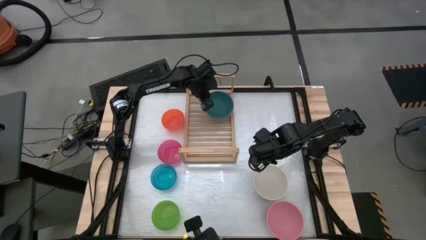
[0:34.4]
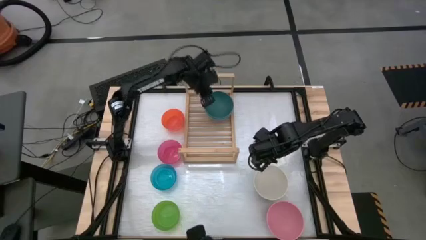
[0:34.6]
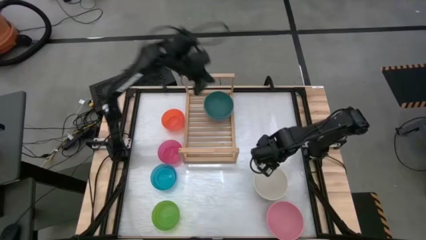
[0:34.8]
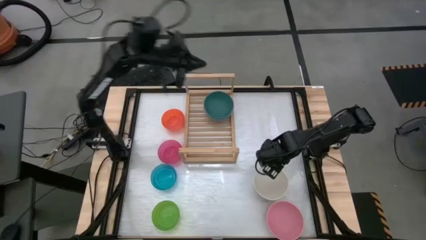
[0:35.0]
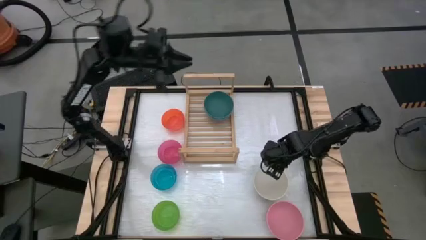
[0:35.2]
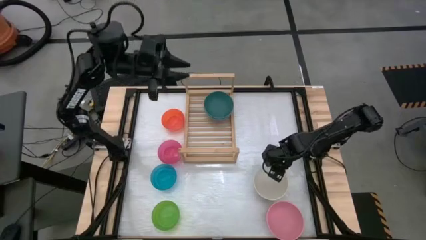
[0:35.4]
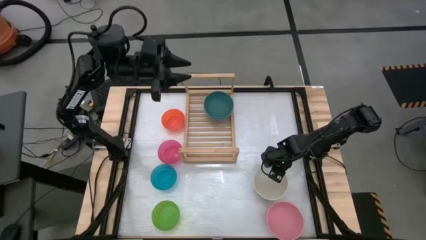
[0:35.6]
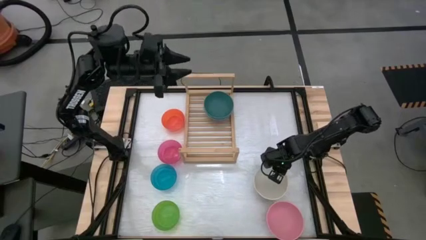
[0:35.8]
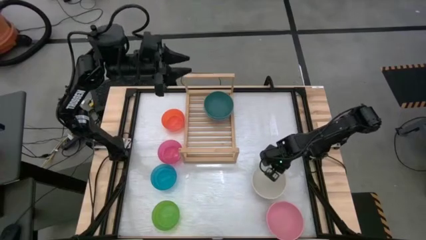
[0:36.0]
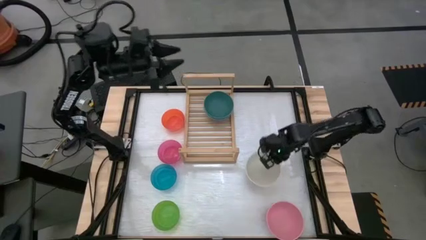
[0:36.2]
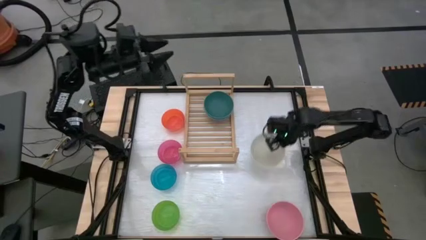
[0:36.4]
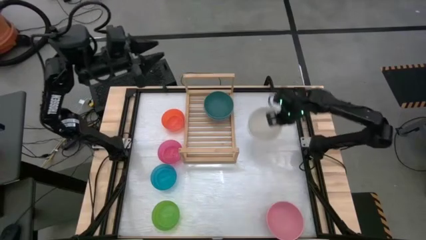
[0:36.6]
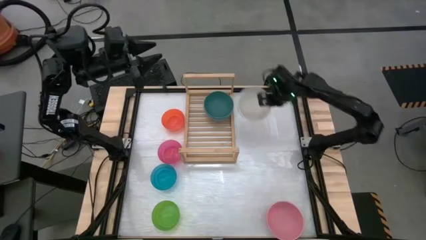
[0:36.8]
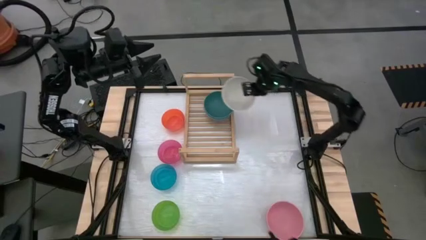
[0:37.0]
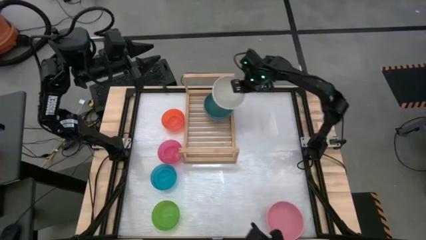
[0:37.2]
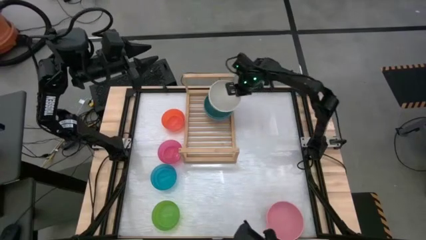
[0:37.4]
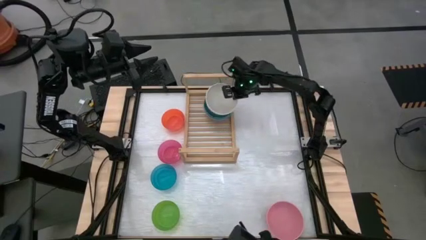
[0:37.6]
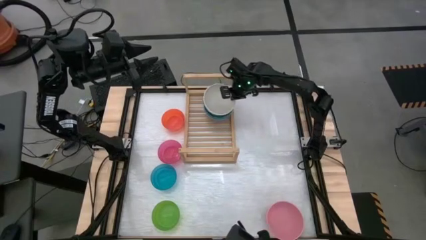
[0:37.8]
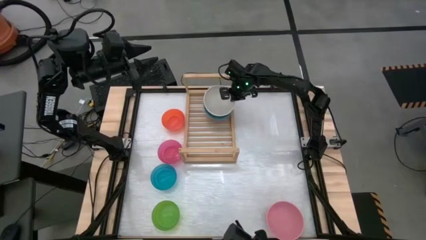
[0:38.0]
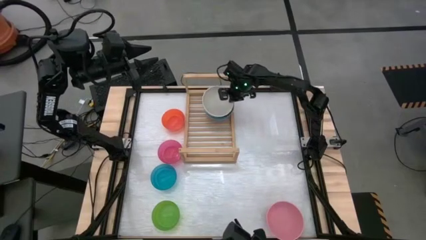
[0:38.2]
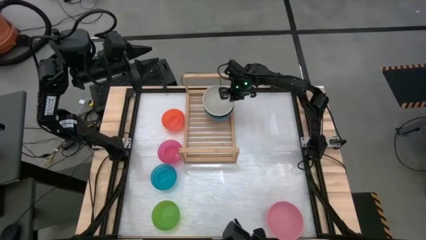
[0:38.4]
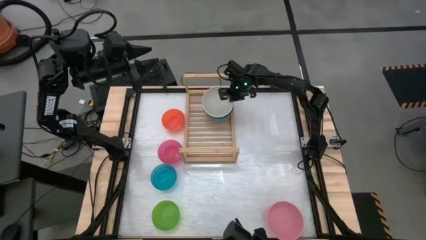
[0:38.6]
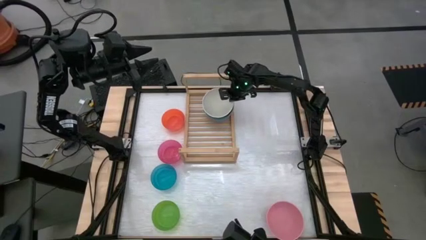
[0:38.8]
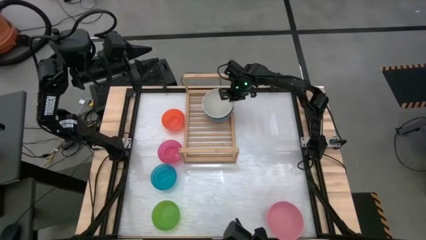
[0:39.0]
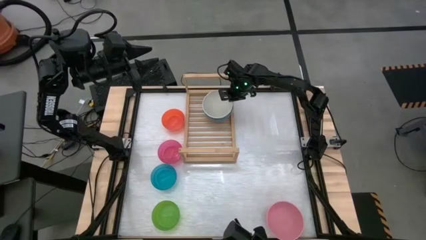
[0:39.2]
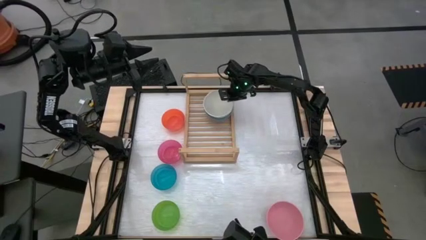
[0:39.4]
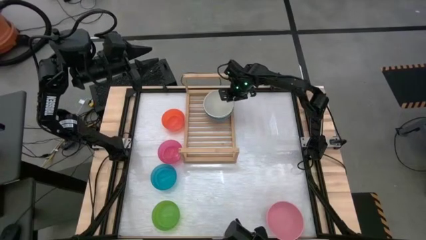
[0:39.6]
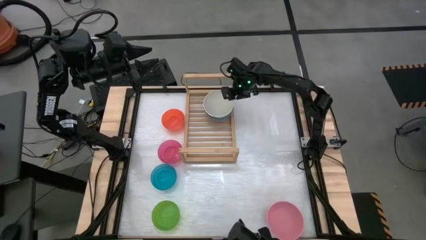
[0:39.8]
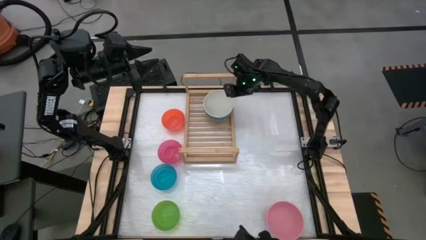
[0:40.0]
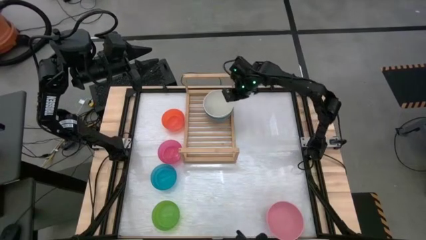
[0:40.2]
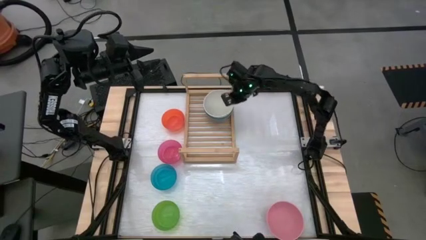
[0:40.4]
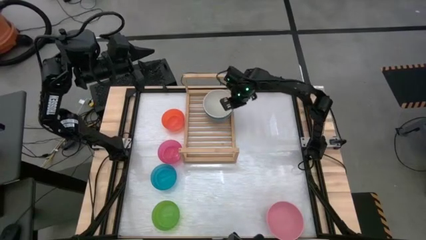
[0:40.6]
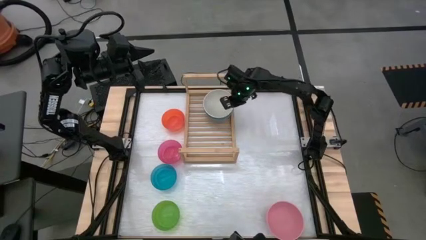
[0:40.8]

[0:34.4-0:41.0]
Task: Place and stack bowls onto a shelf
Stack the white bowl on the green bowl on the shelf

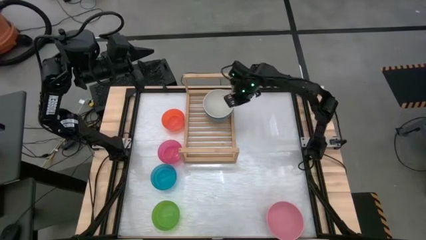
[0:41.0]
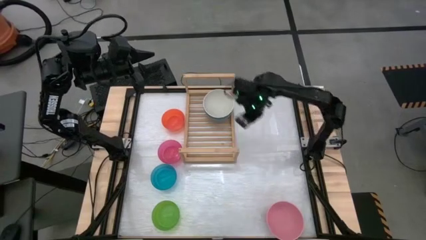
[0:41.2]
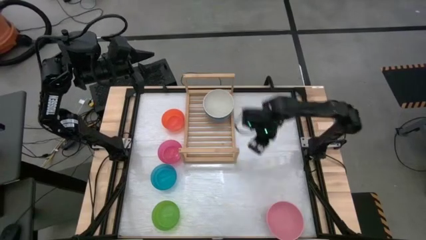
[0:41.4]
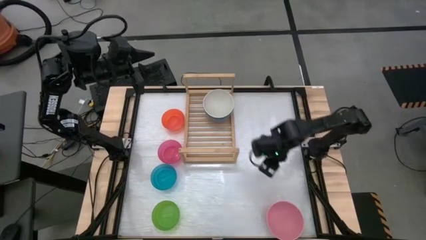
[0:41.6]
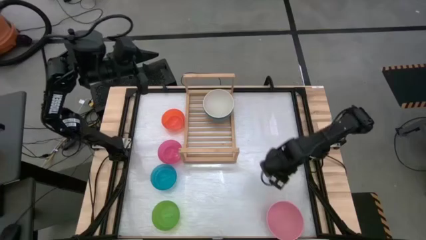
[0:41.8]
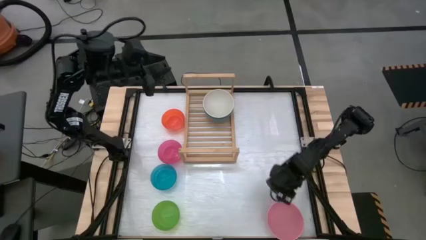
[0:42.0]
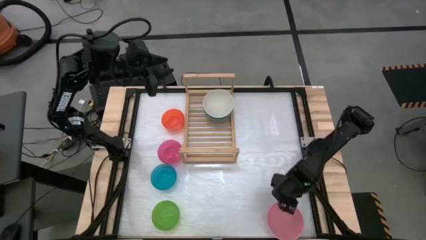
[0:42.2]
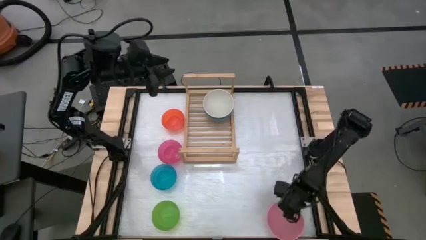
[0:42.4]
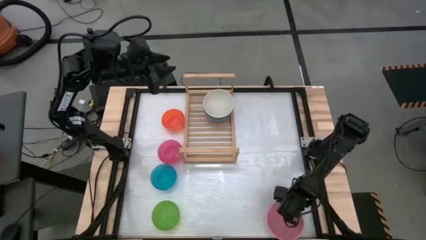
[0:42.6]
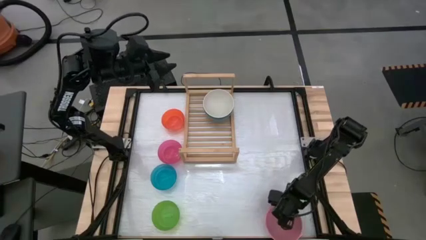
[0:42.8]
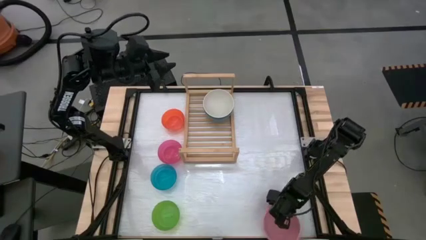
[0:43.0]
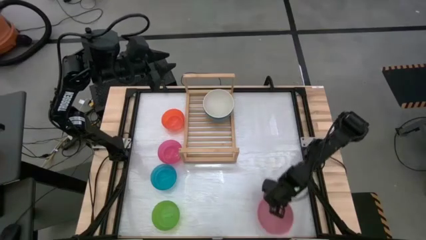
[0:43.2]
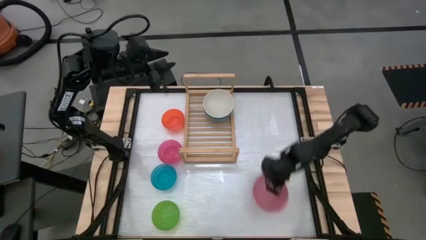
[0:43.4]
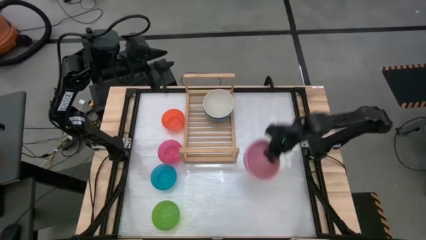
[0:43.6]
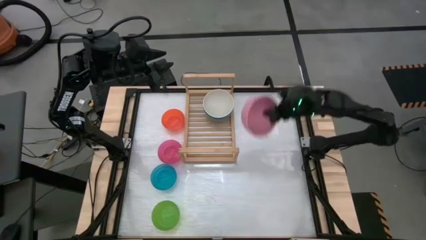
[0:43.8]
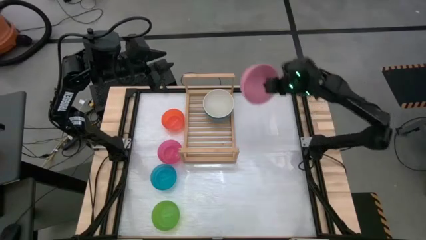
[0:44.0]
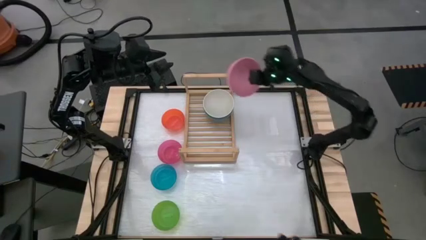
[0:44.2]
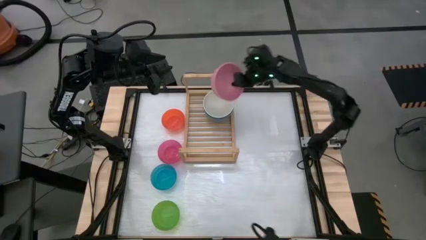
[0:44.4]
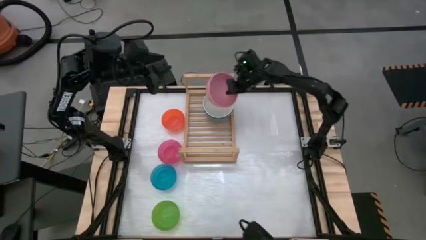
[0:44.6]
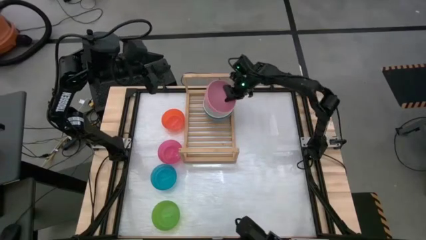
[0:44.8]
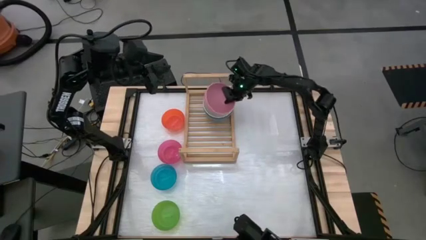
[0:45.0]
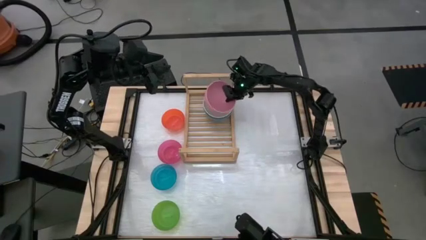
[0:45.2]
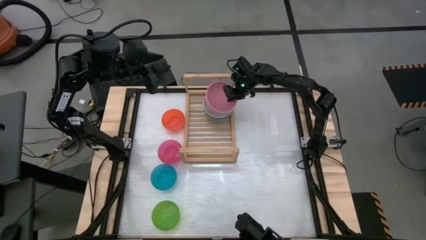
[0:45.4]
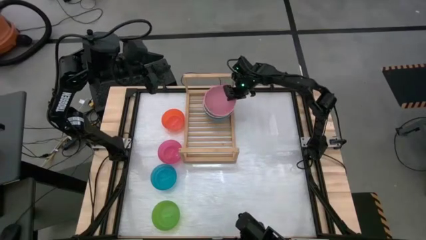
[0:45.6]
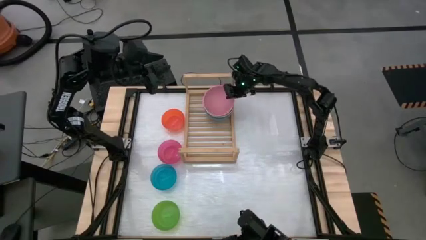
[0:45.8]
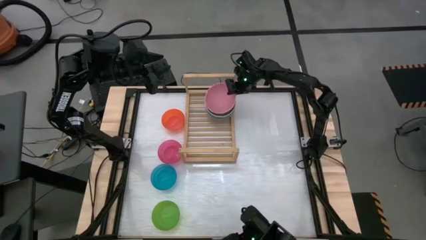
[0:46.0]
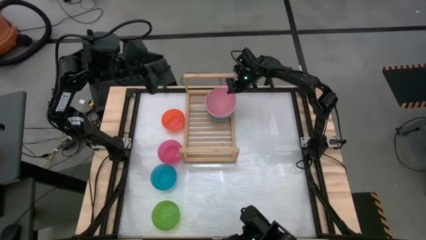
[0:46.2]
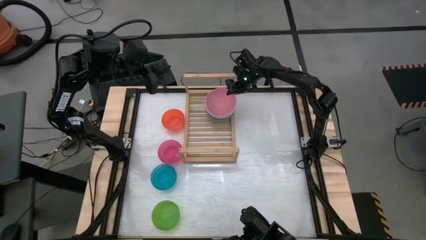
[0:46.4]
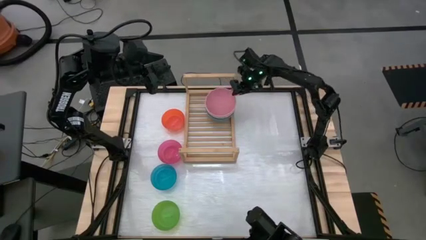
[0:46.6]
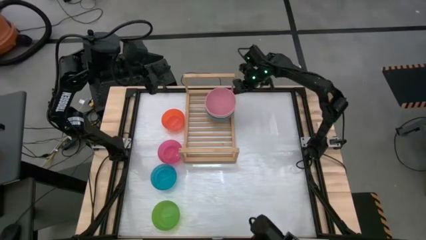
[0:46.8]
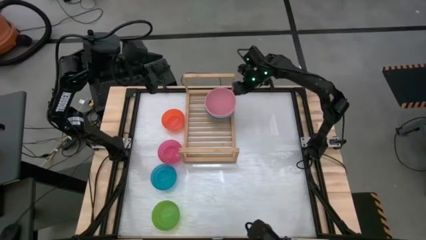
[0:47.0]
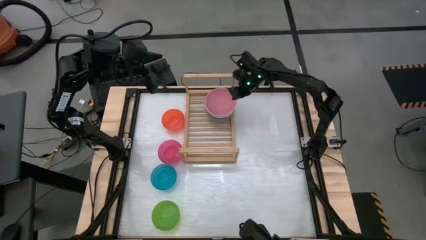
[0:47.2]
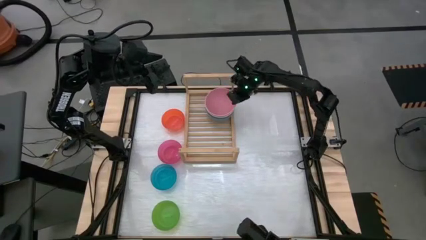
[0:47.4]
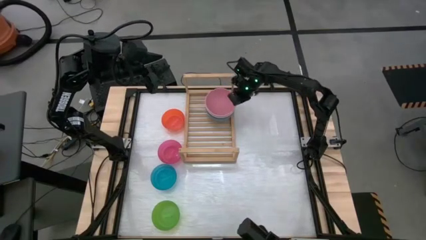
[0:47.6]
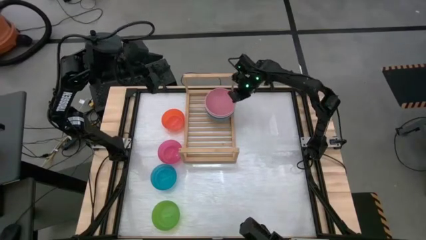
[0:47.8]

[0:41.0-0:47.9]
Stack the right pink bowl on the white bowl on the shelf

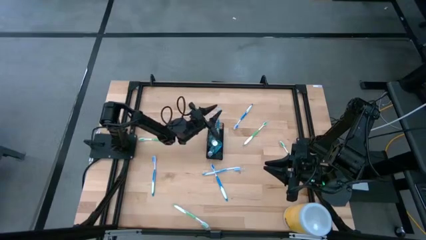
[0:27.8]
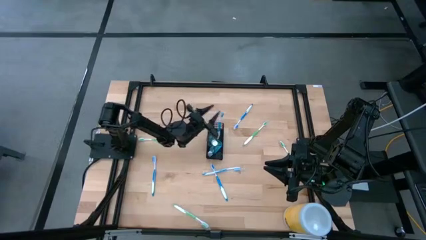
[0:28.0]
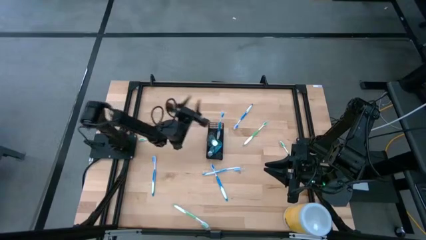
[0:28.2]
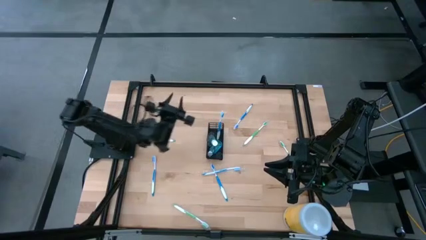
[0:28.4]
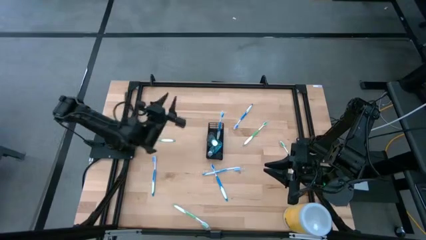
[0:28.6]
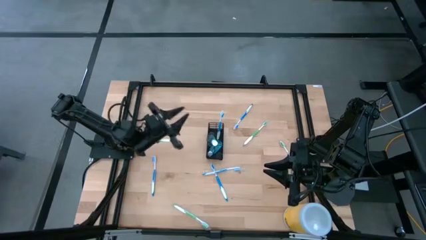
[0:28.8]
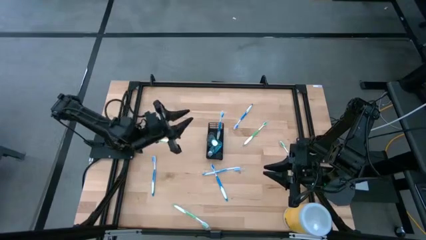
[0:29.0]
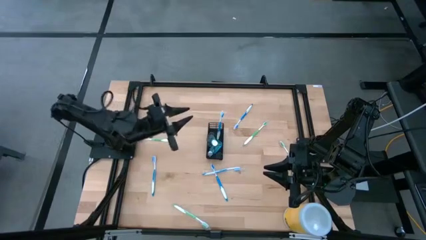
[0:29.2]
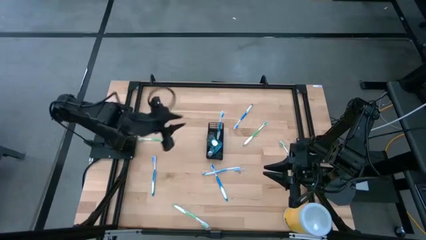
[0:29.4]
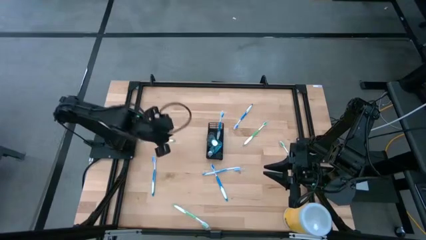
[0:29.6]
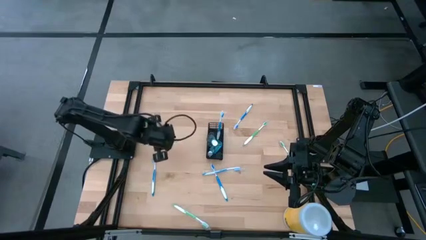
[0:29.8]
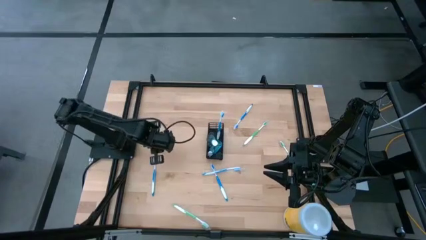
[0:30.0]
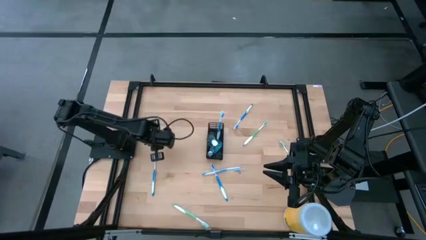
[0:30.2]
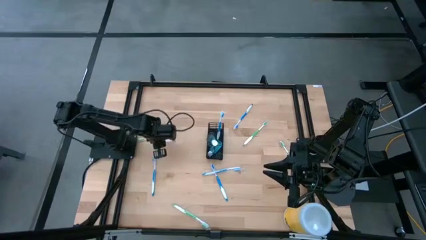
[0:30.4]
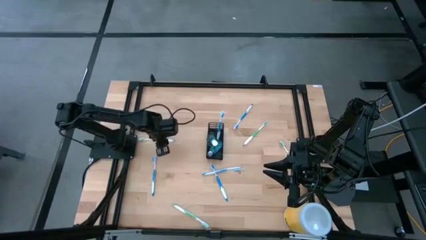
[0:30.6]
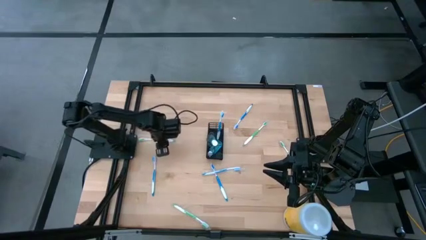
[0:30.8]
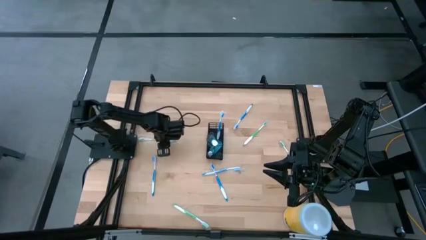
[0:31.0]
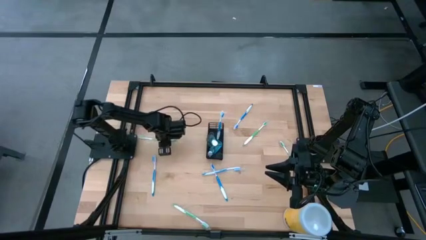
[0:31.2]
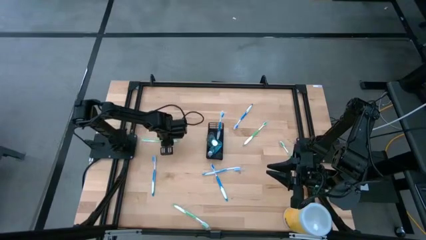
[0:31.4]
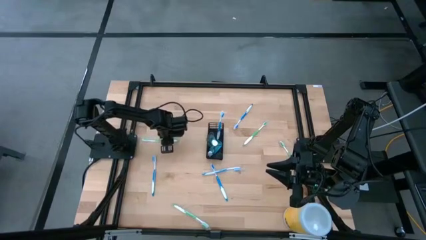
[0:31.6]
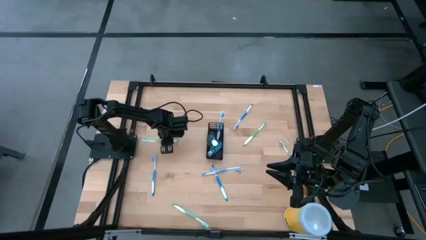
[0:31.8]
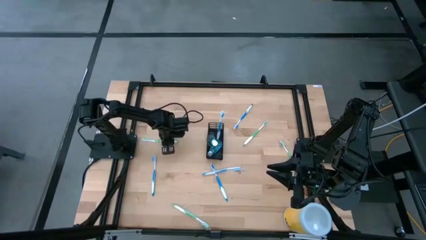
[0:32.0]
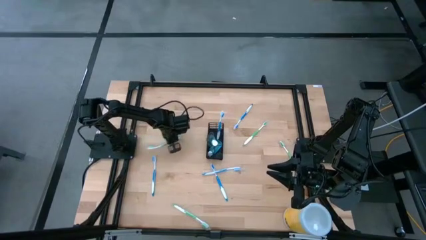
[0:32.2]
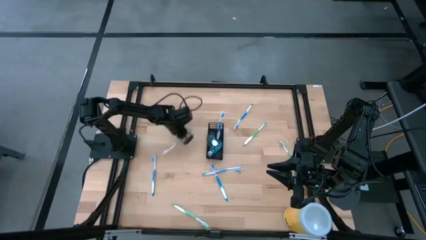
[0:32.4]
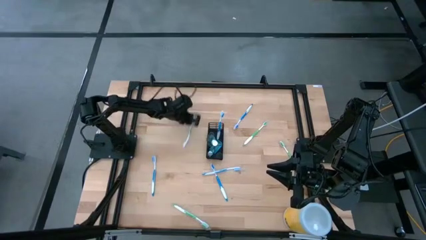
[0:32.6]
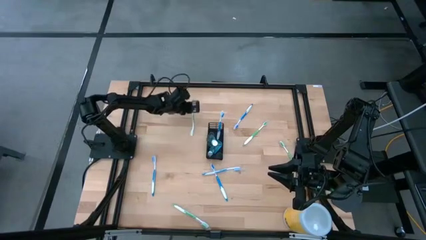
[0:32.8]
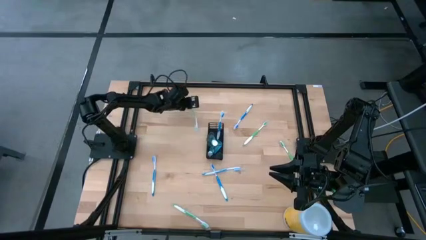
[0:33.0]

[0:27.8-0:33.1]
Task: Pick & Place toothbrushing station
Put the green toothbrush into the black organizer
